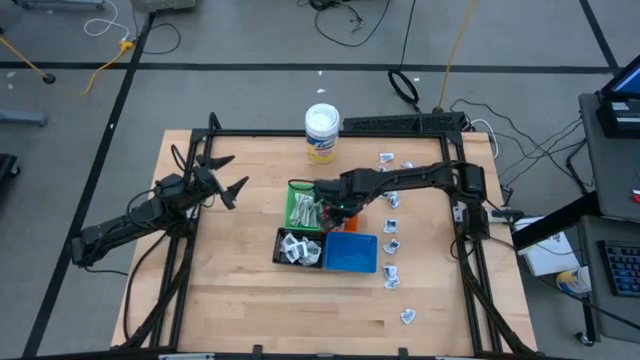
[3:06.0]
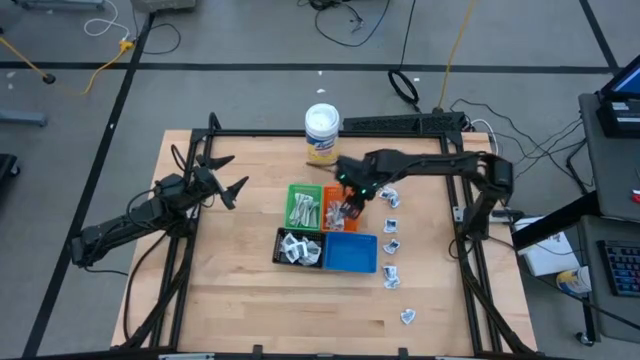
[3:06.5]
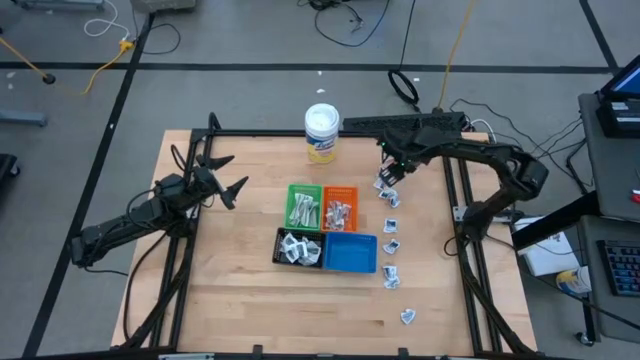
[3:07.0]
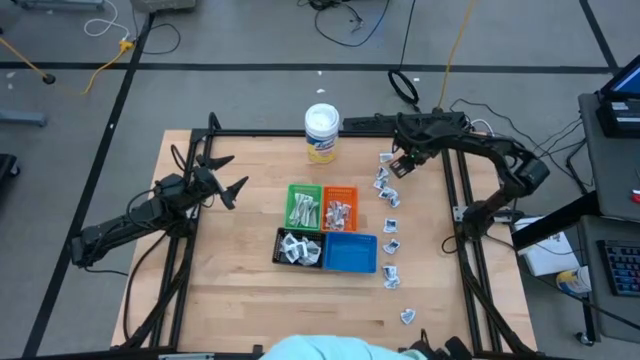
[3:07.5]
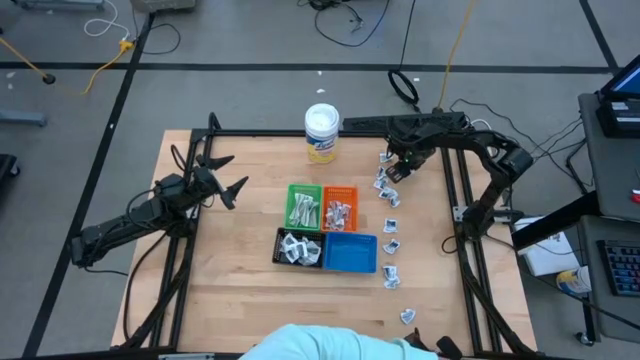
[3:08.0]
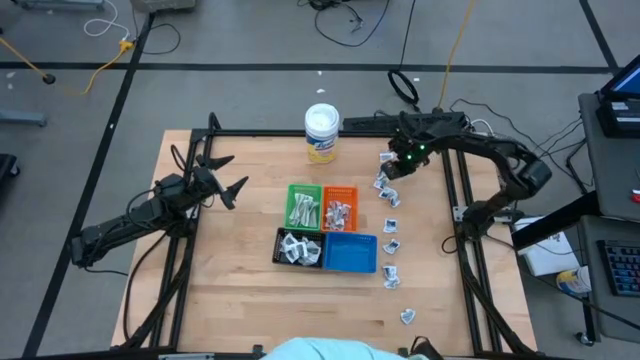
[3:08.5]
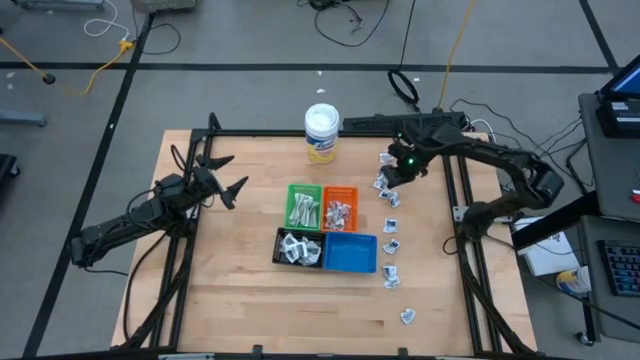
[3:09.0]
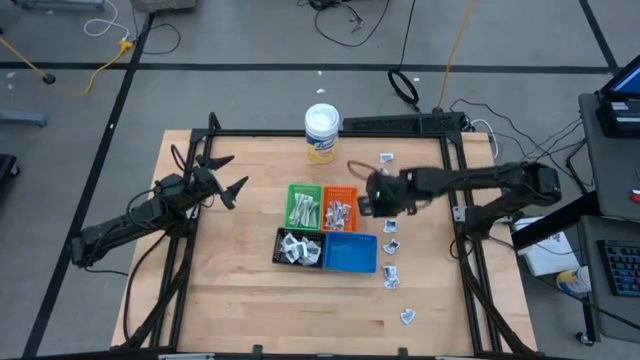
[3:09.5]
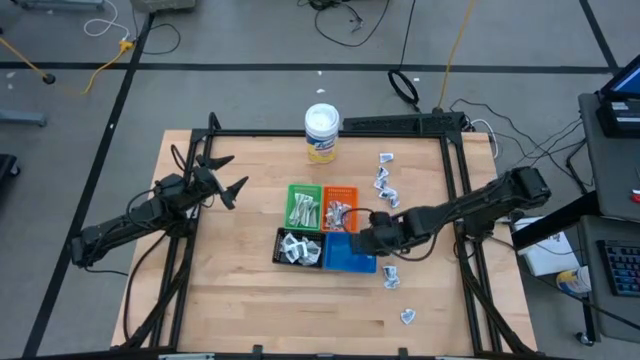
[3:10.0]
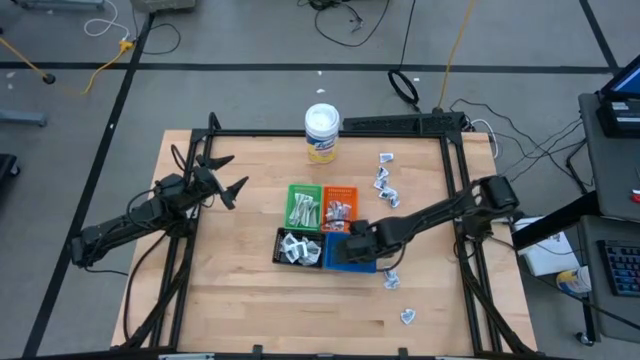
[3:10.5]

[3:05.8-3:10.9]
Task: Pick & Place First Aid Supplies
Put the alcohol pad into the blue bin

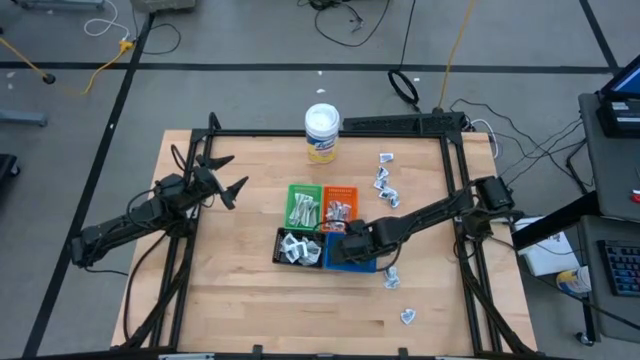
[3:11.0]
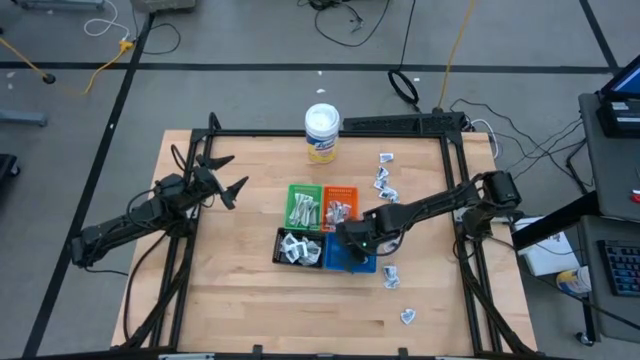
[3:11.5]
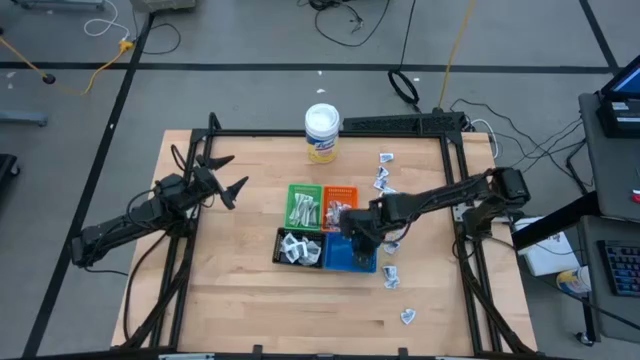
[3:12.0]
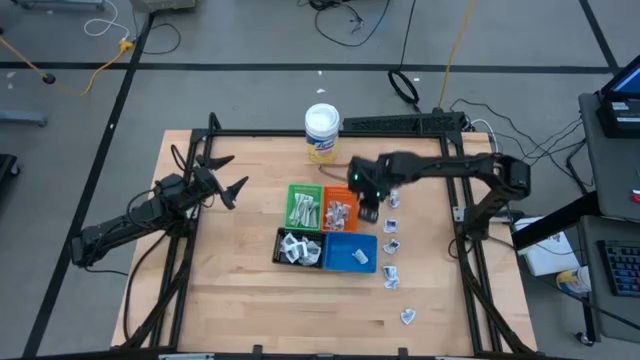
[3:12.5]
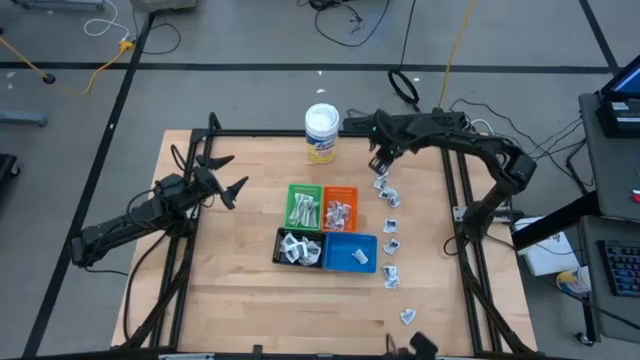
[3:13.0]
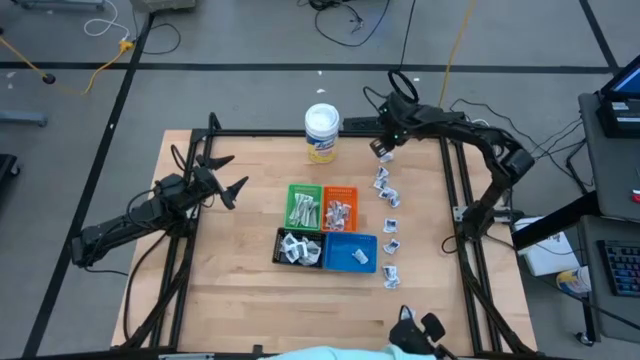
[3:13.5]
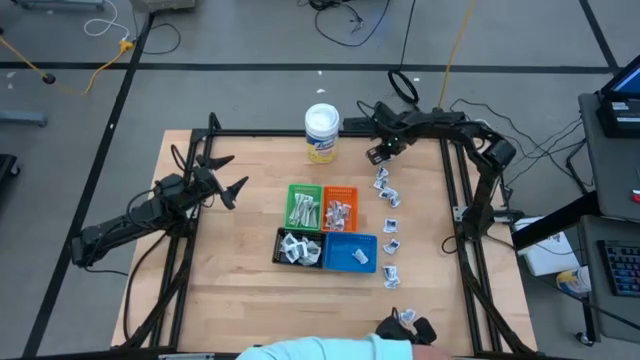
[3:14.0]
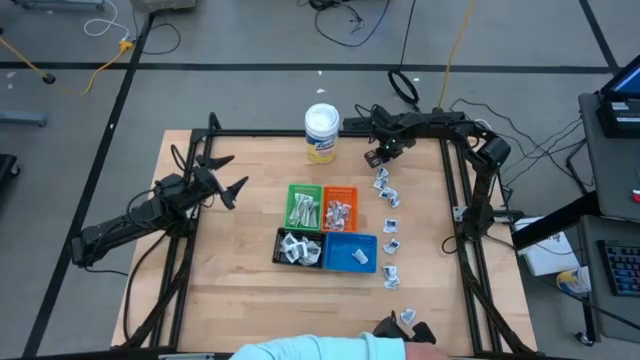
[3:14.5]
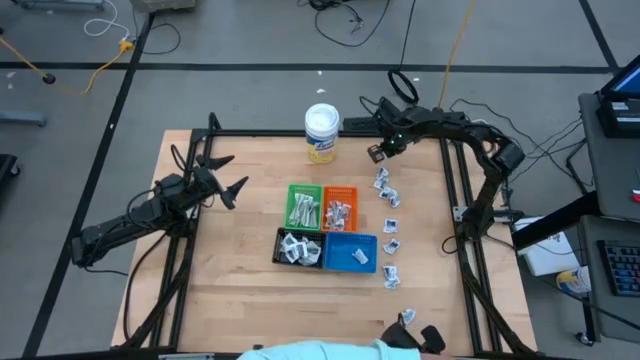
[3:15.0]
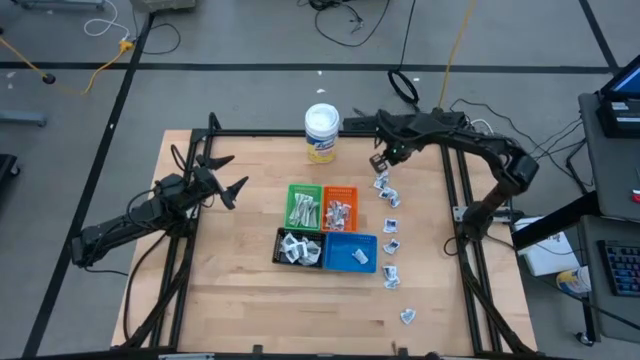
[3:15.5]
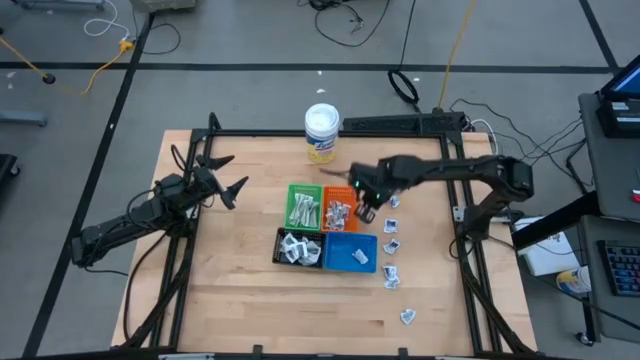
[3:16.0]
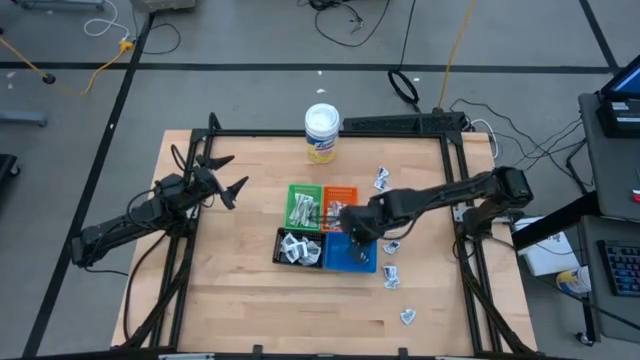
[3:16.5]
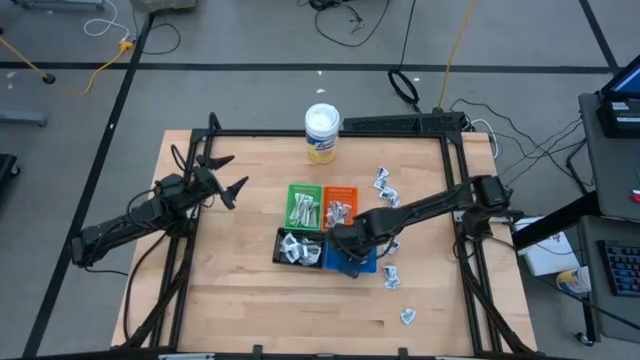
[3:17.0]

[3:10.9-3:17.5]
Put the alcohol pad into the blue bin

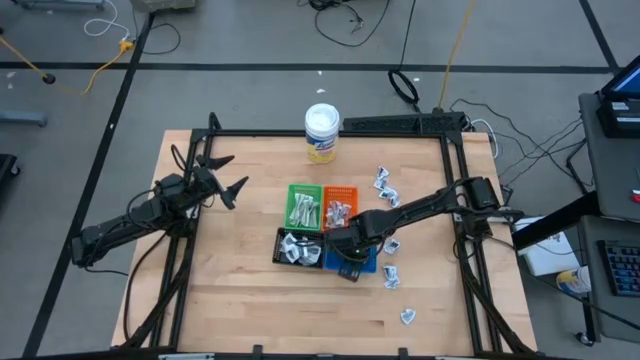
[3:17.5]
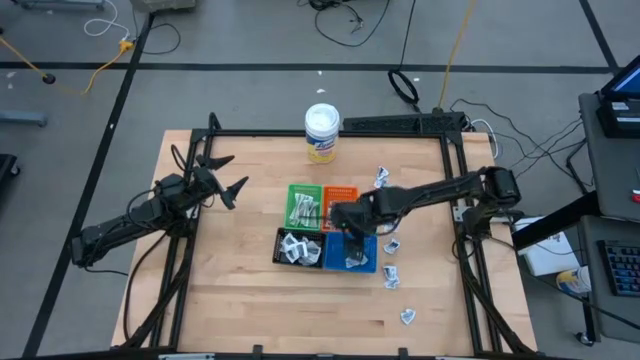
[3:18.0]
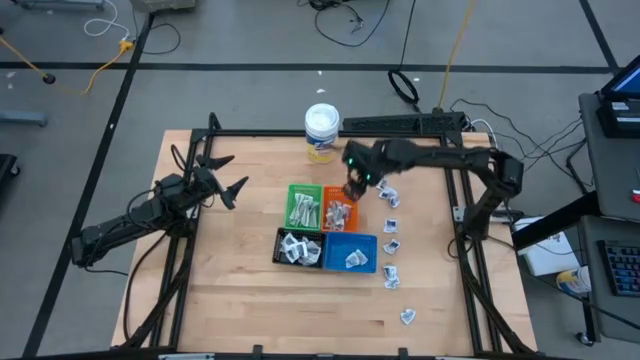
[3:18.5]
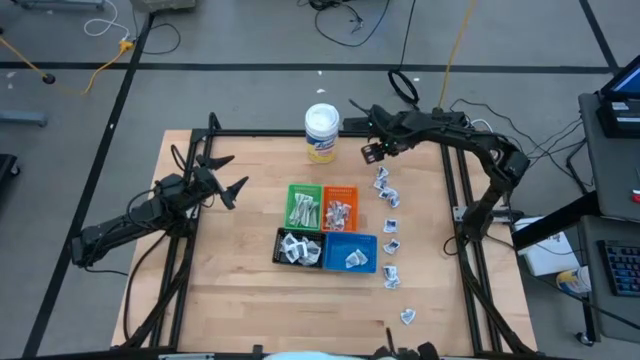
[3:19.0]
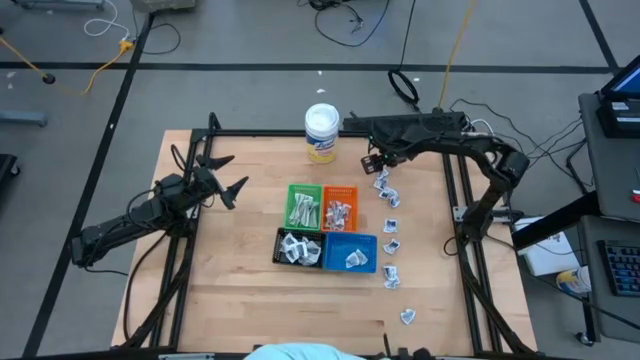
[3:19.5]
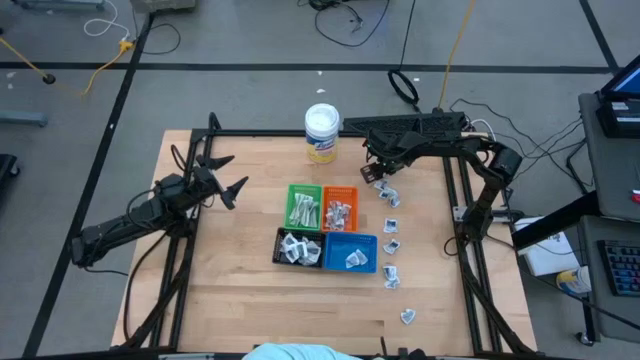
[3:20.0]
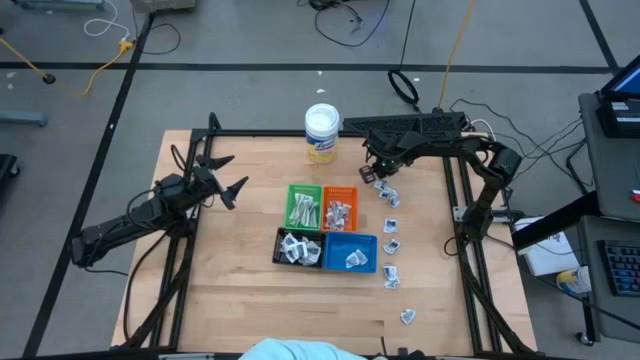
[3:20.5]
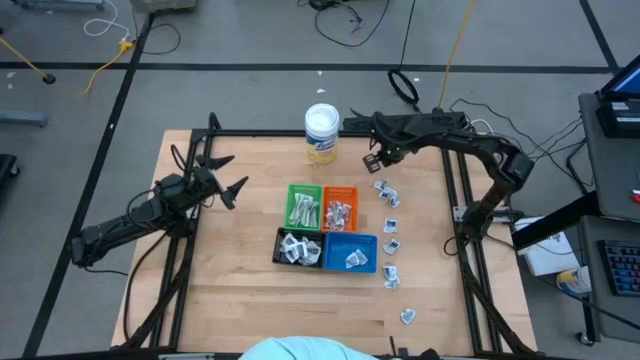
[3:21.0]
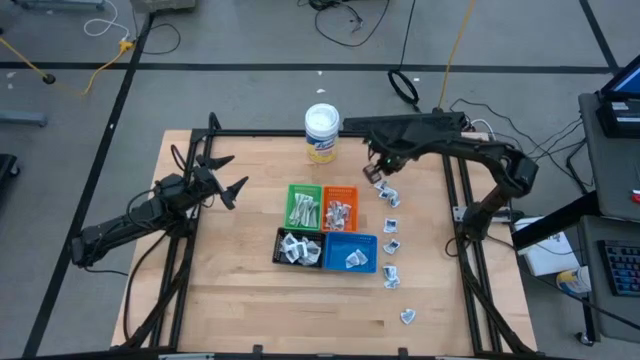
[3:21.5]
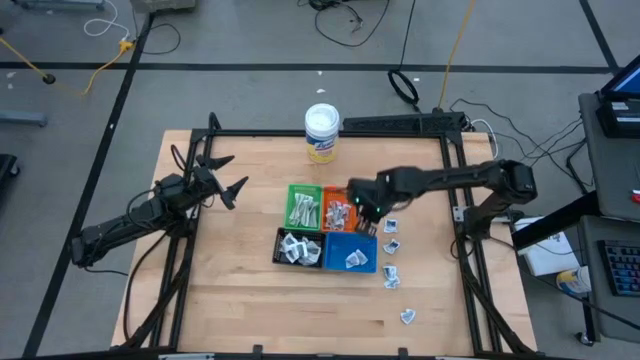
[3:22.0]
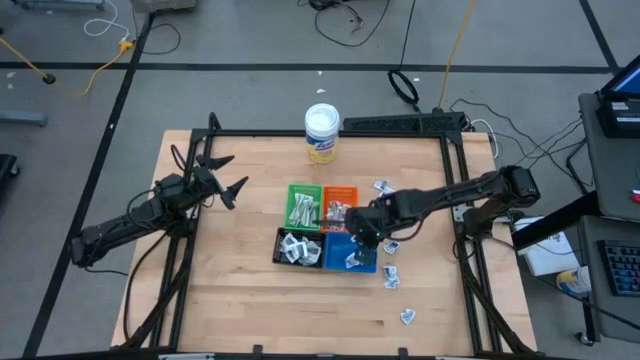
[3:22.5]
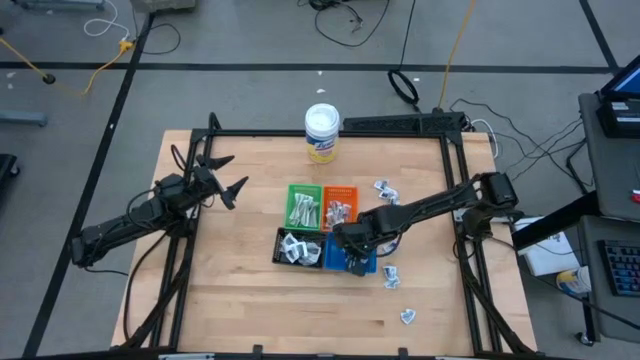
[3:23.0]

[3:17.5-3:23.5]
Put the alcohol pad into the blue bin

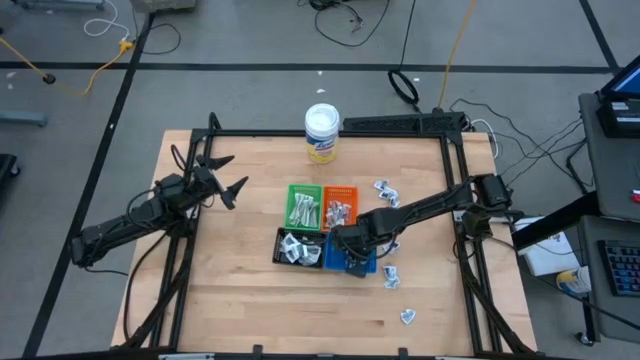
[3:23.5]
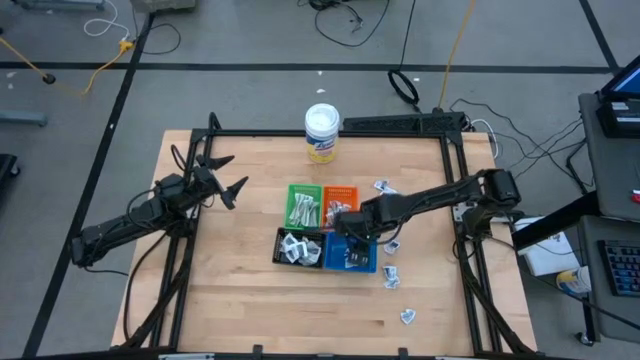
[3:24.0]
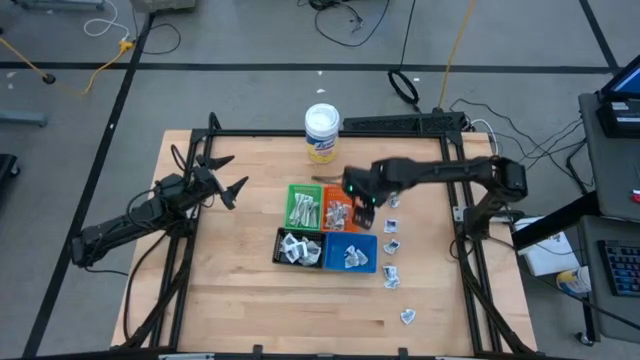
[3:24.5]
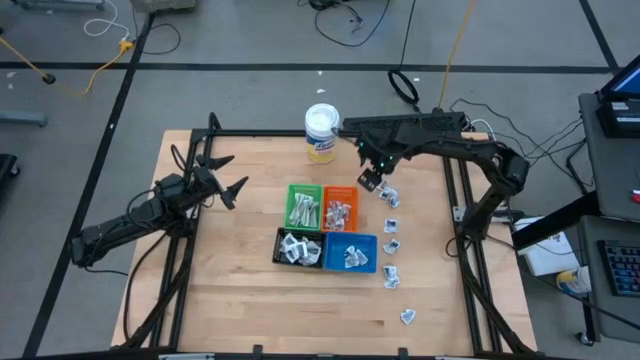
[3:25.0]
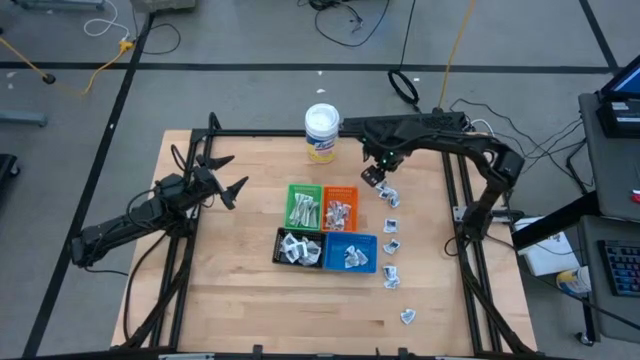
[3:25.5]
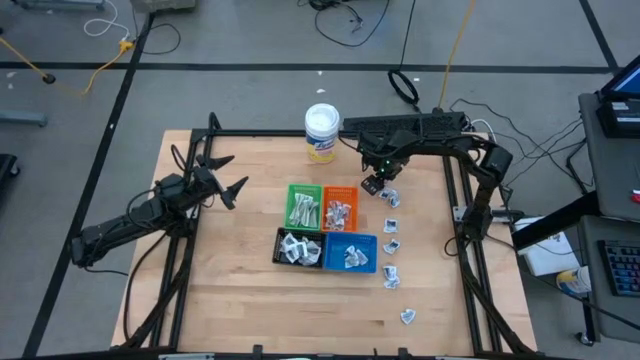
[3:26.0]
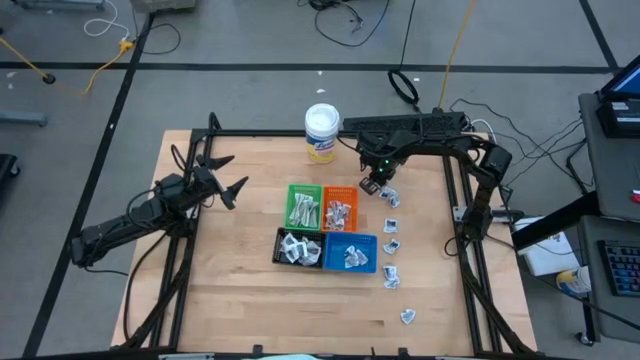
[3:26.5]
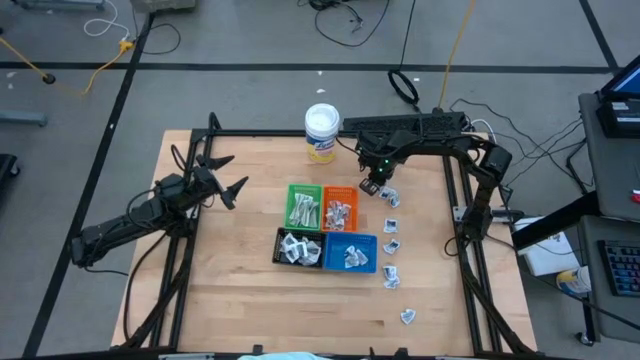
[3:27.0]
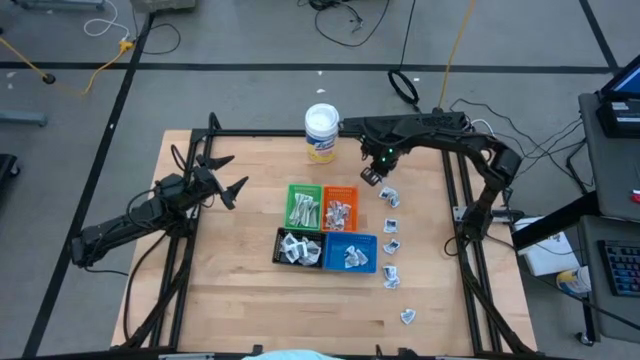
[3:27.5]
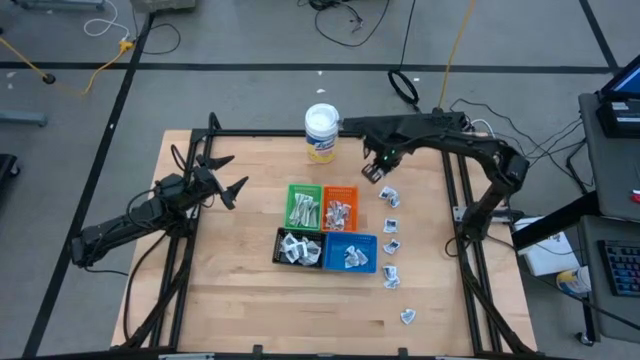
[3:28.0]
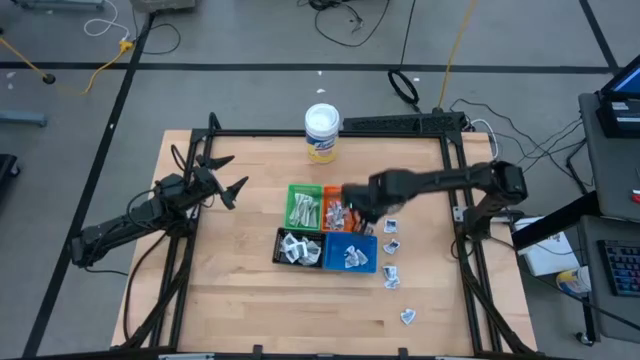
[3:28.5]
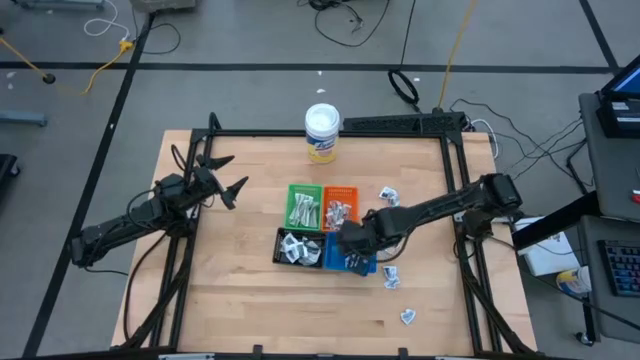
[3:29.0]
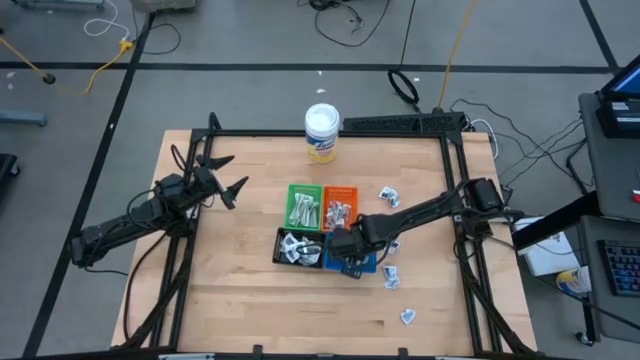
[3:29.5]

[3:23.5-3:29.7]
Put the alcohol pad into the blue bin
